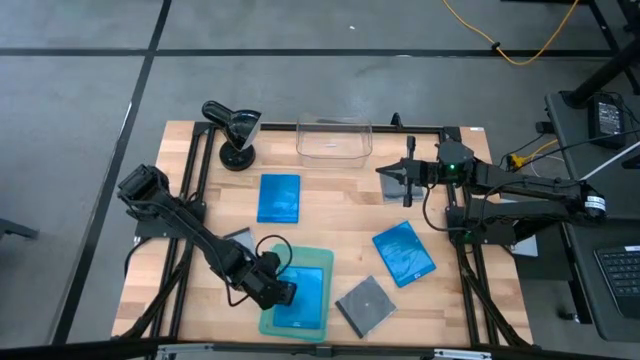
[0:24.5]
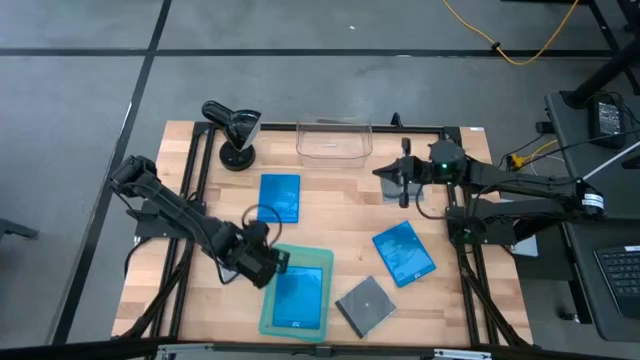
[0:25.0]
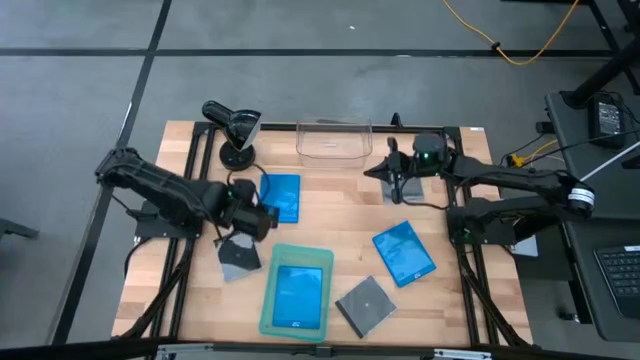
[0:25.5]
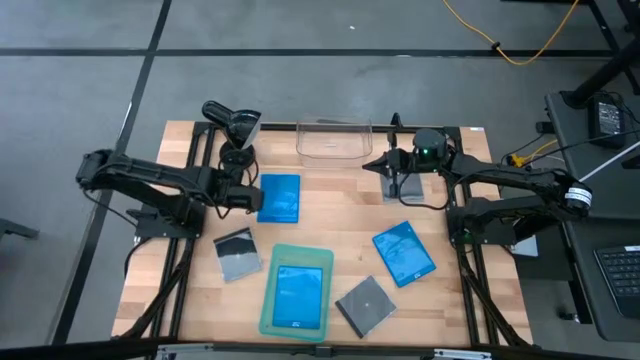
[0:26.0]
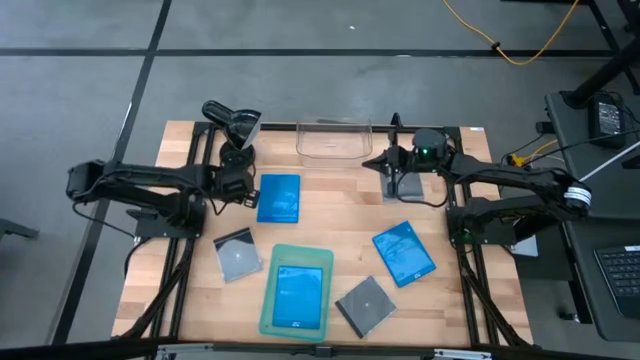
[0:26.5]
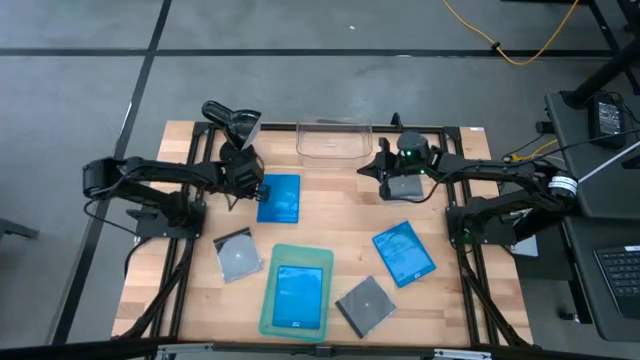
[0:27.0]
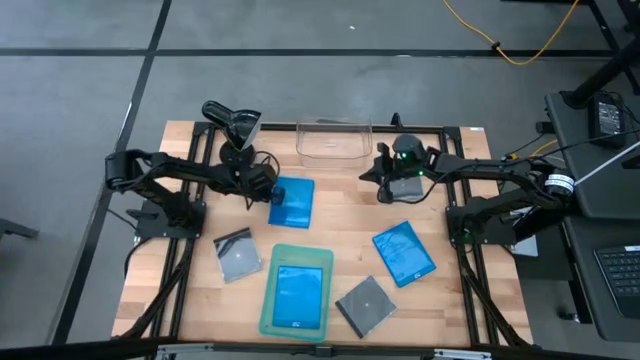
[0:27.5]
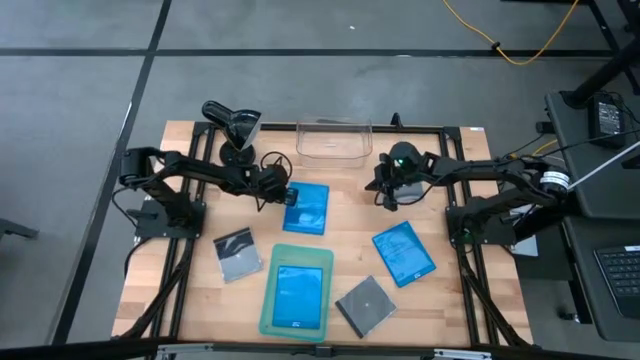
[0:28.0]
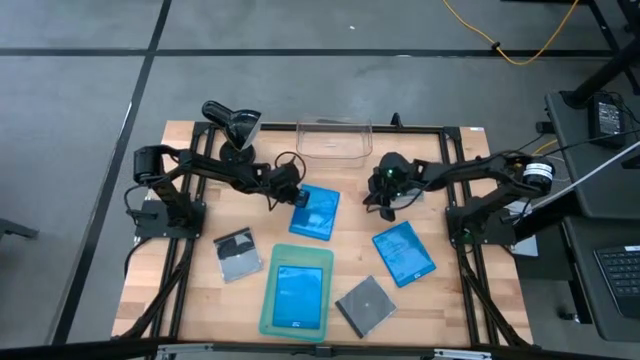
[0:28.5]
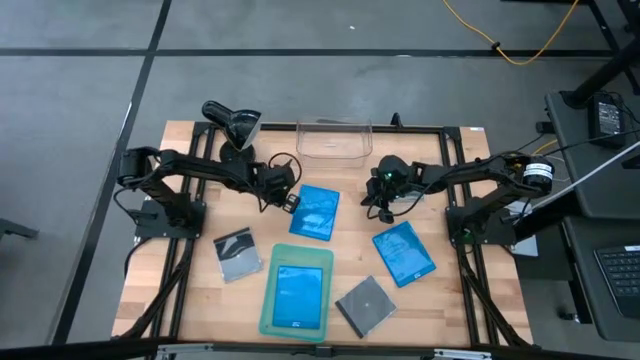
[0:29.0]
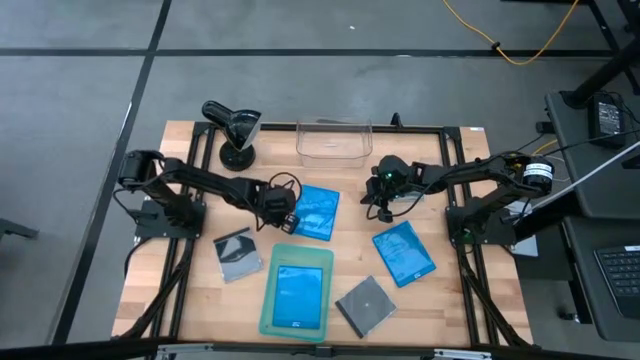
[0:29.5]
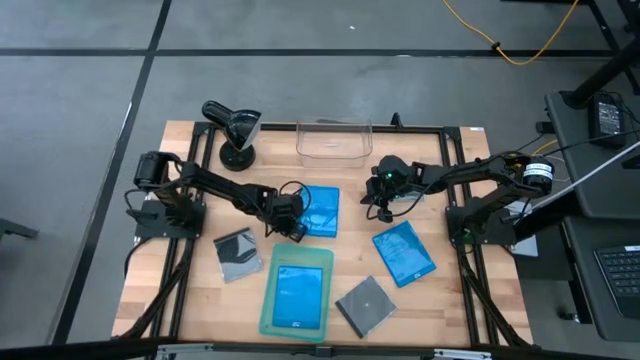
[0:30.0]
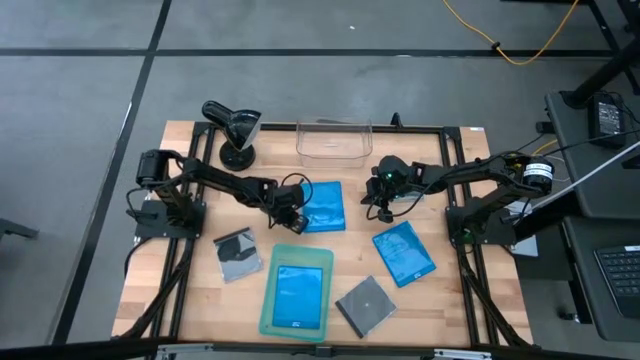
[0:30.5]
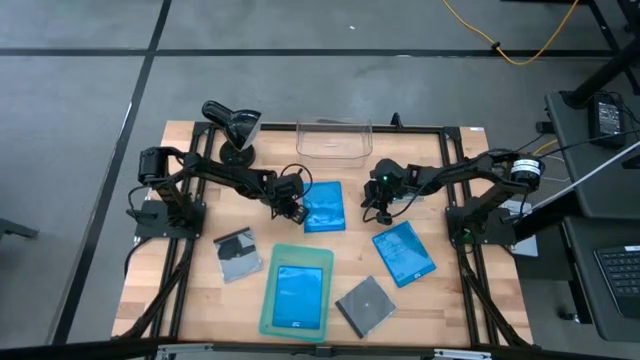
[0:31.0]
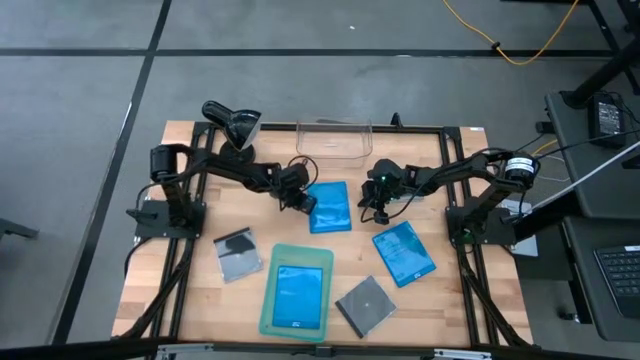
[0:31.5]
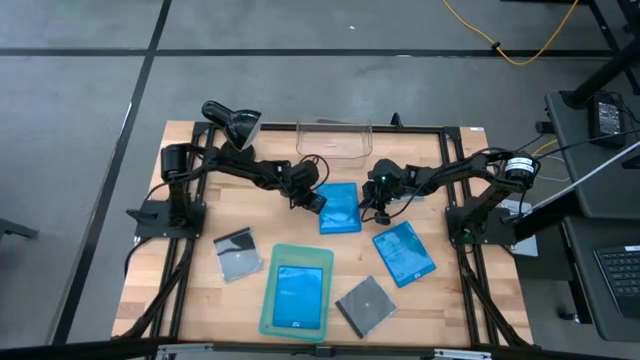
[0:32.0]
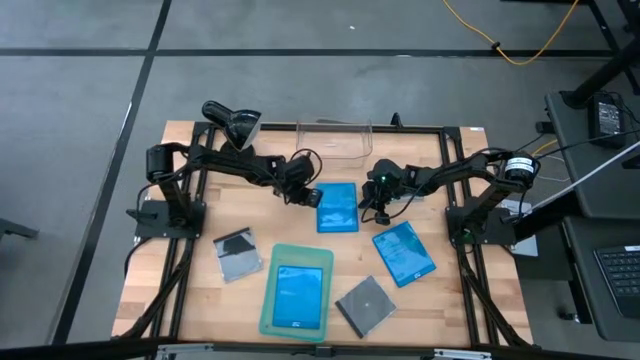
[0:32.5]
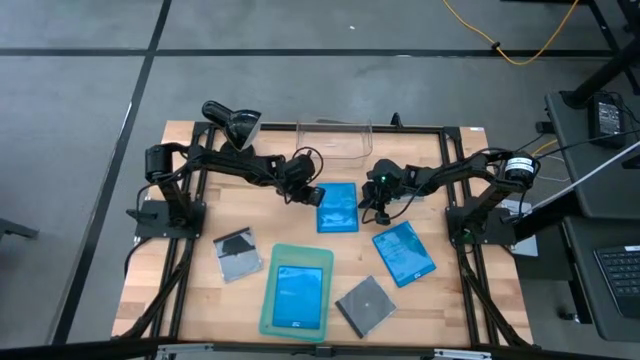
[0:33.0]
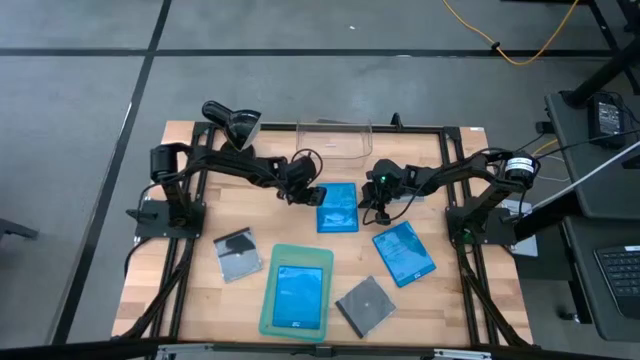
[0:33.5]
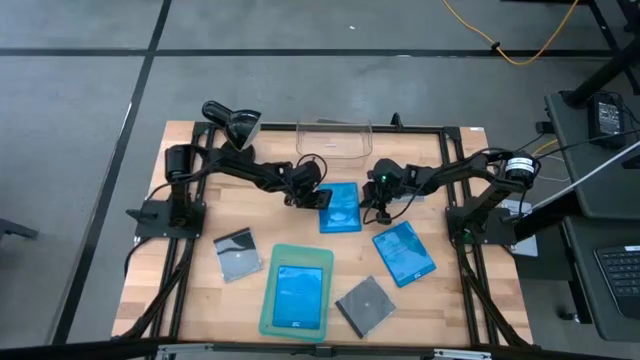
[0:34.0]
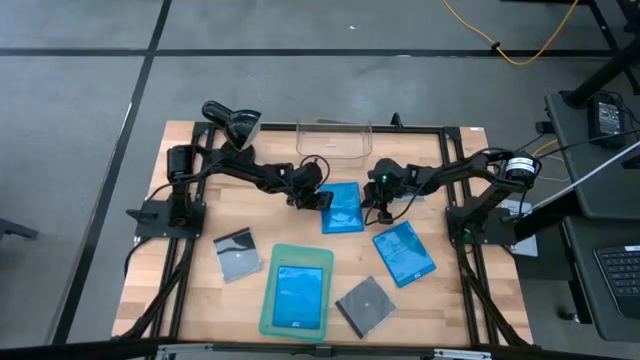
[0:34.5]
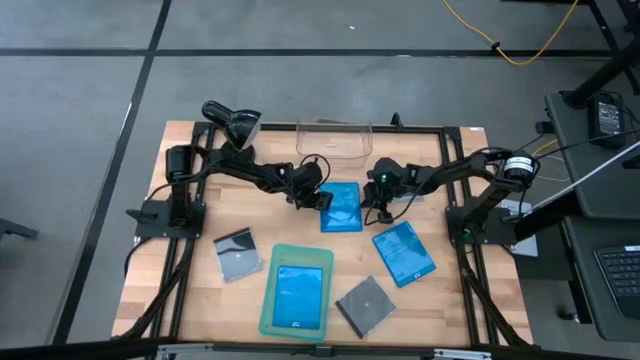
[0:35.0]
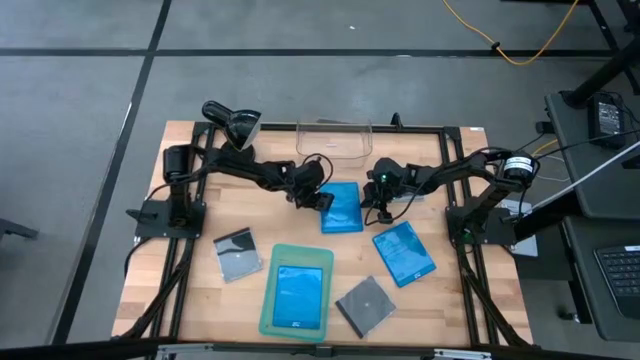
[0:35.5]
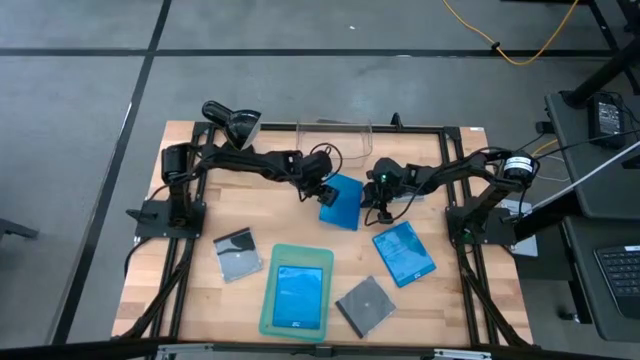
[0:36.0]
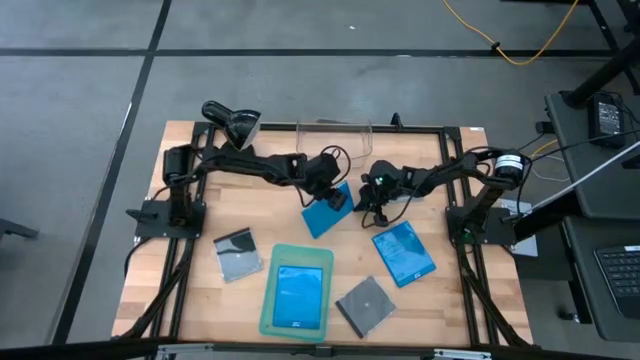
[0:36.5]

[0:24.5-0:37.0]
Task: Pick & place jewel cases by type
Put the left blue cd case into the green bin

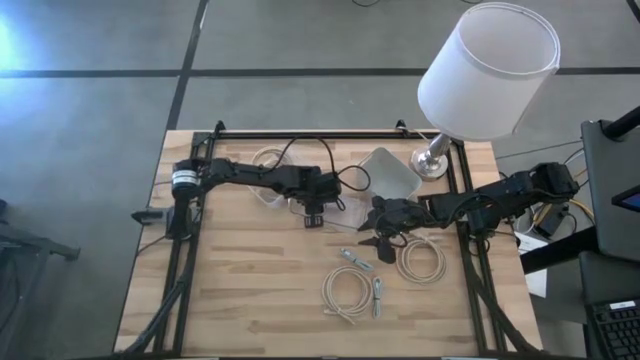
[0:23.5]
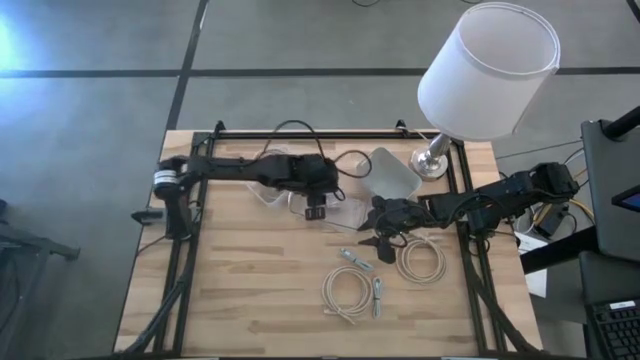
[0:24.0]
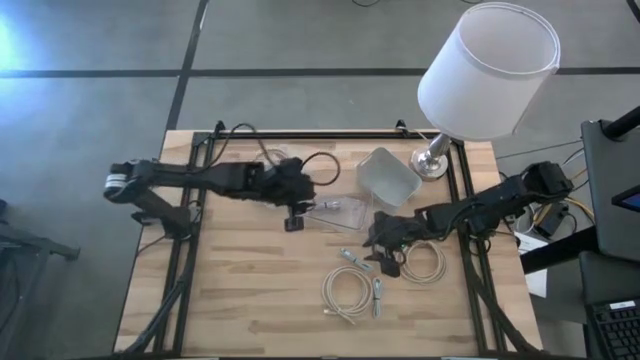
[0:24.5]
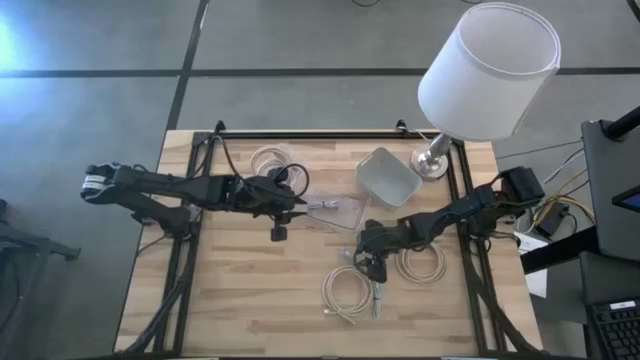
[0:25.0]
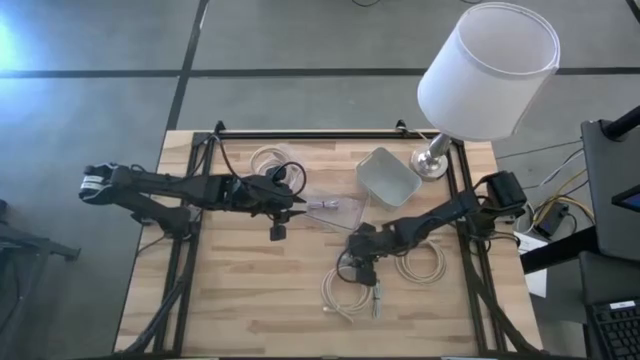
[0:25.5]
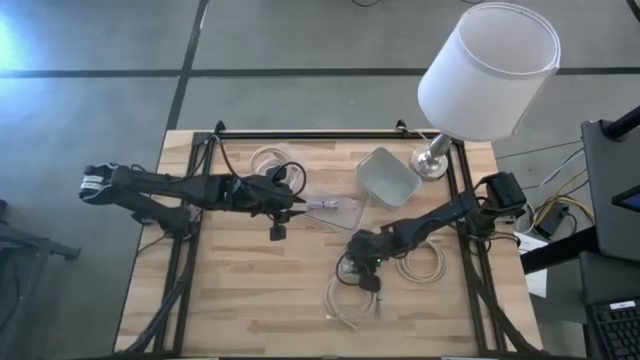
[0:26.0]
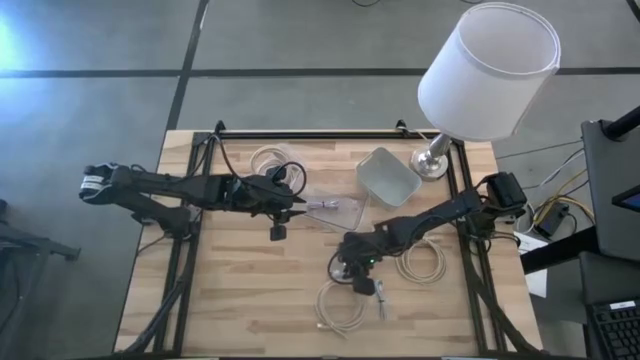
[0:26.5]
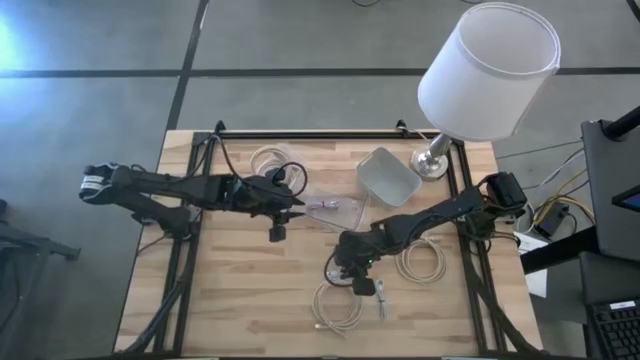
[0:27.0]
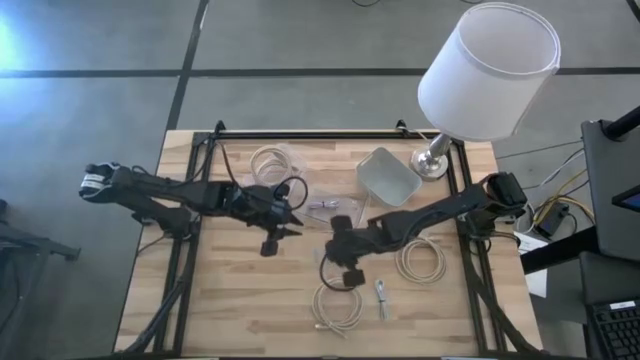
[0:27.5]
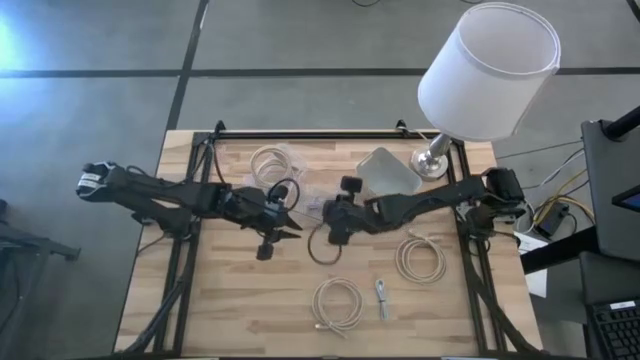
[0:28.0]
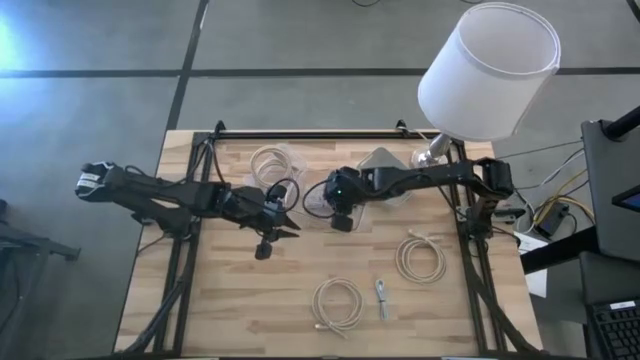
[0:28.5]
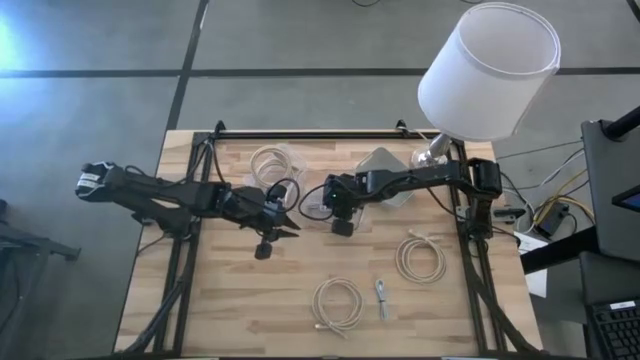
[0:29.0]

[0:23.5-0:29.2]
Task: Pick & Place USB Port
Put the blue USB cable into the transparent bin

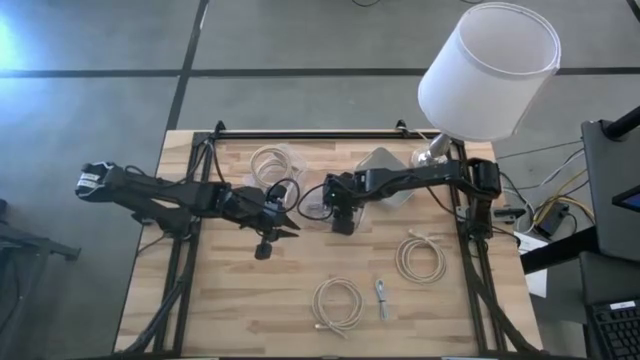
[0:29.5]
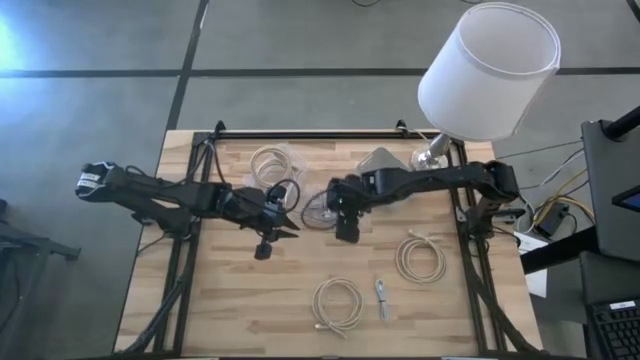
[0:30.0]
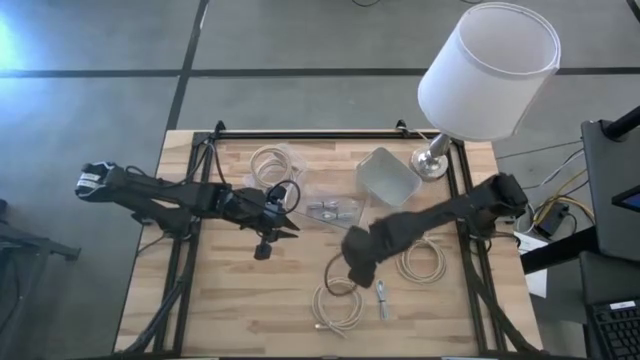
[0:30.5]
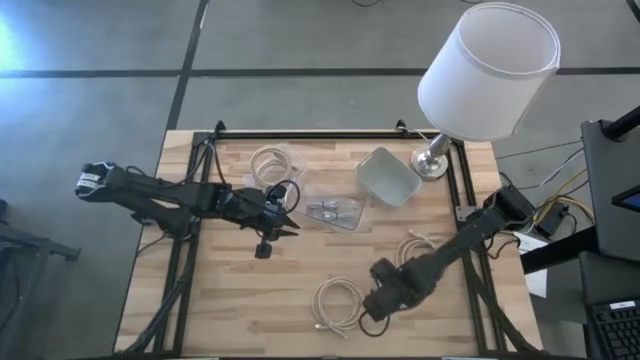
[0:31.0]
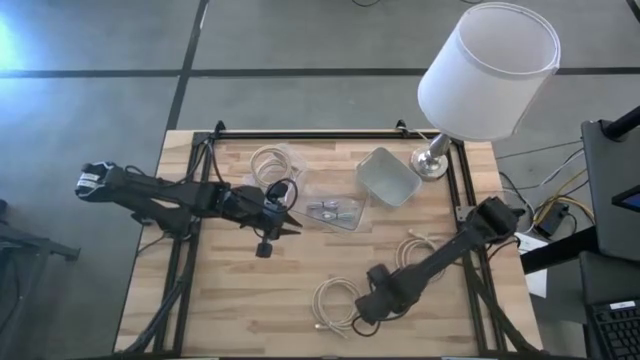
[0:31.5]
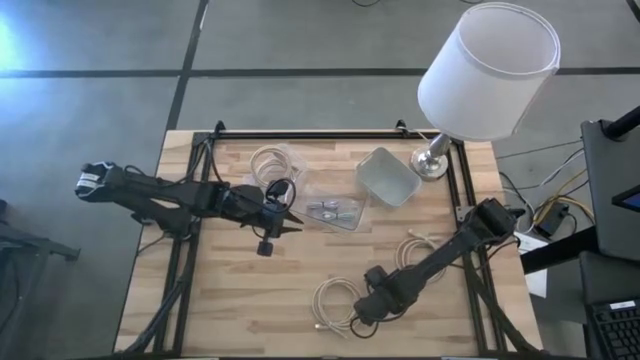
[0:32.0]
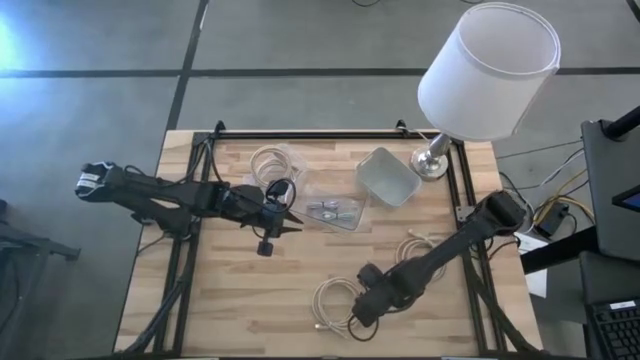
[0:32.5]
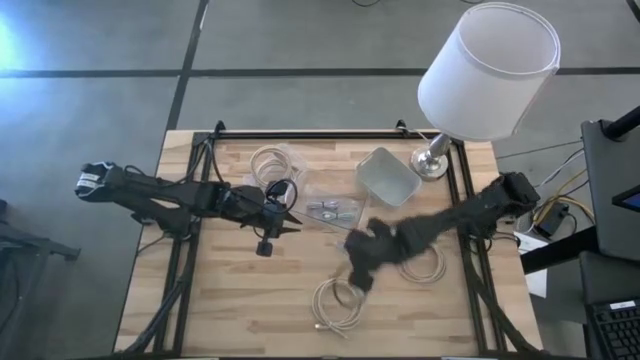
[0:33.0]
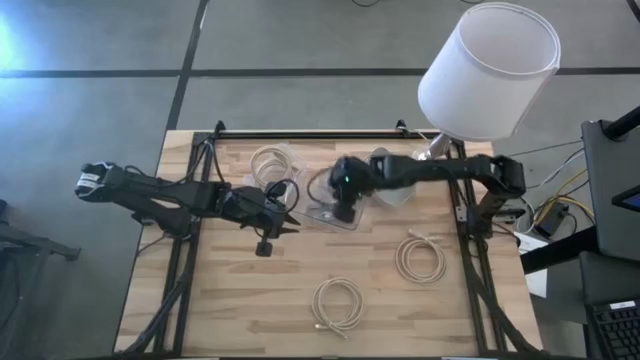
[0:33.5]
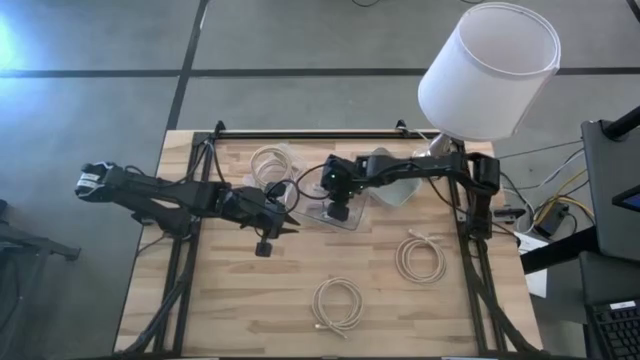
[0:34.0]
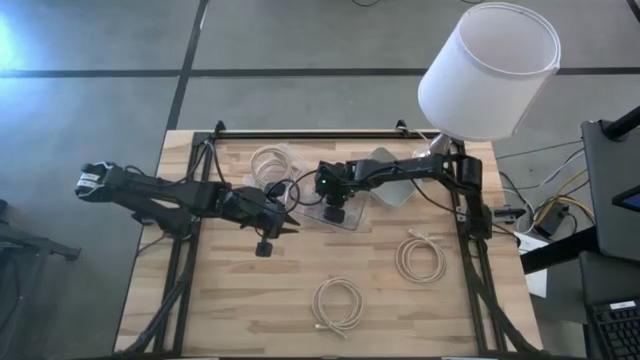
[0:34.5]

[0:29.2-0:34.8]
Put the white USB cable into the transparent bin
